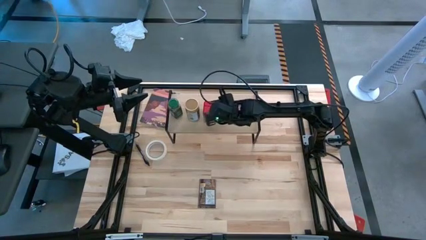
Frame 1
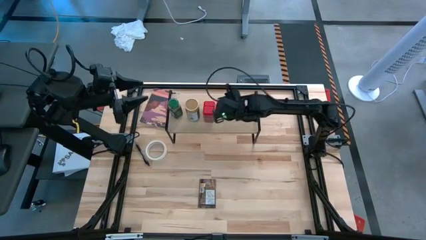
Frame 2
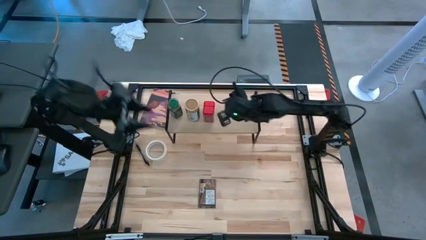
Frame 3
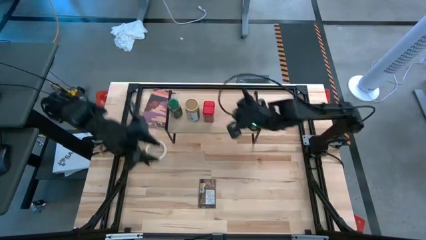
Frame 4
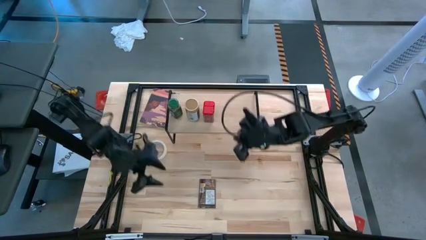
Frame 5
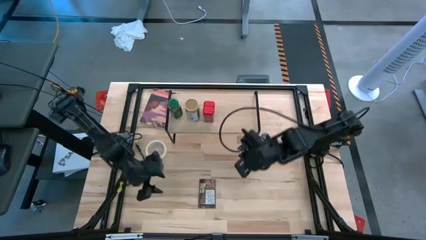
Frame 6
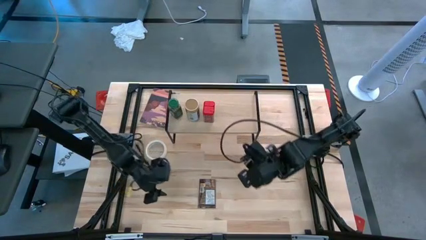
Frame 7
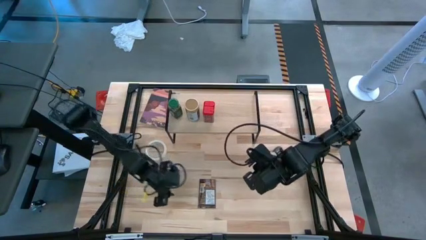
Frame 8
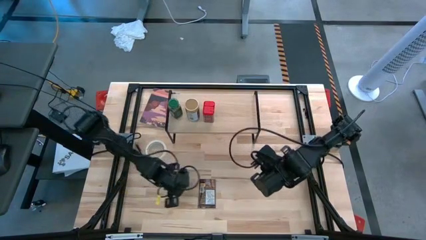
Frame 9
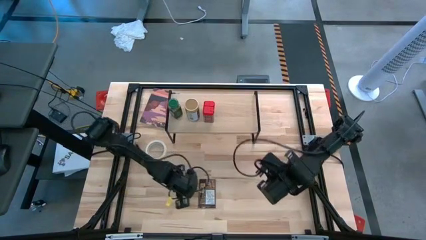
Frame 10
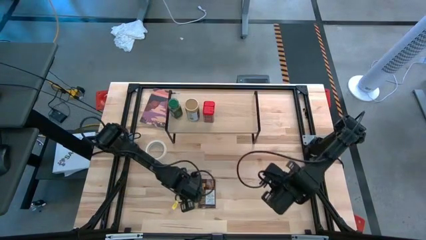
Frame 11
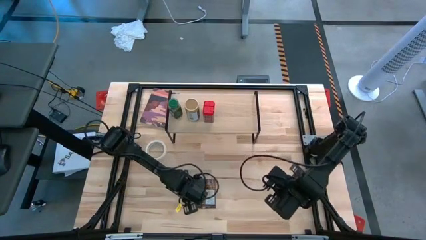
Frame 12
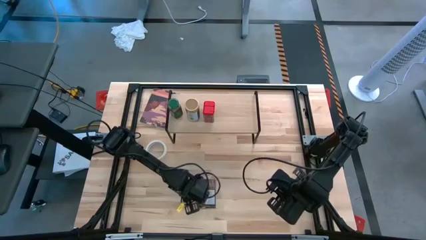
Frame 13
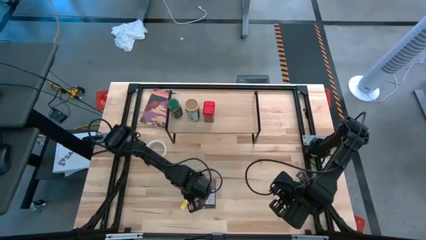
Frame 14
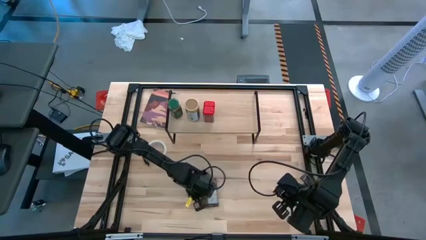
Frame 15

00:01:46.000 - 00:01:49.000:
Task: Shelf spices
Put the brown seasoning pack on the shelf

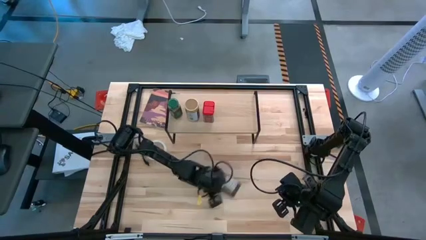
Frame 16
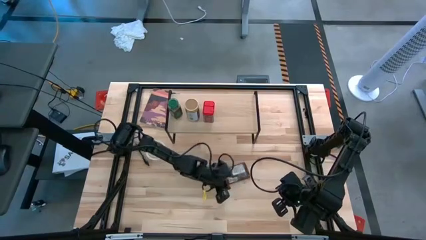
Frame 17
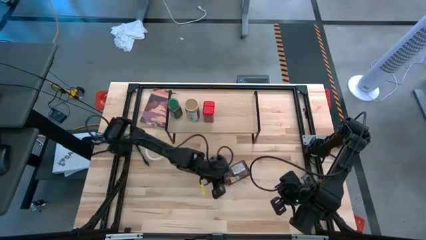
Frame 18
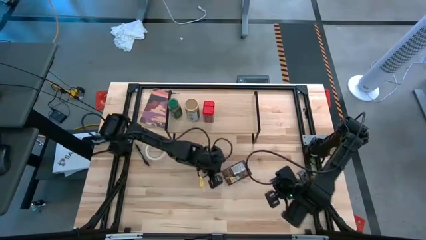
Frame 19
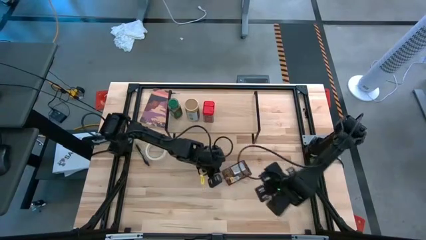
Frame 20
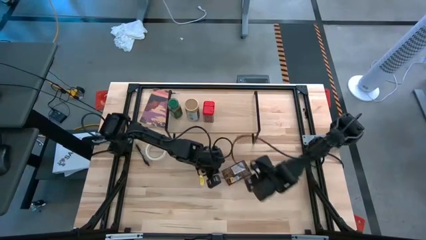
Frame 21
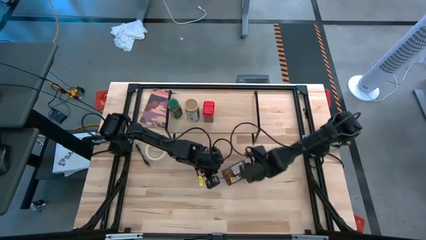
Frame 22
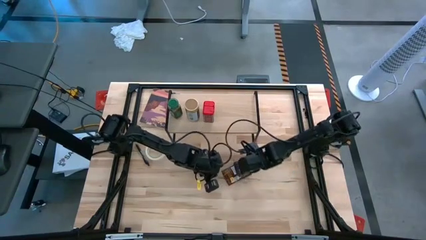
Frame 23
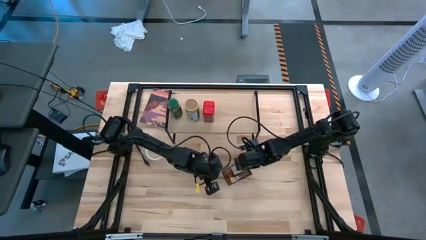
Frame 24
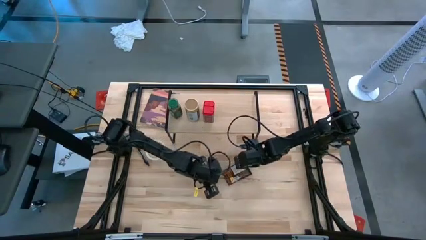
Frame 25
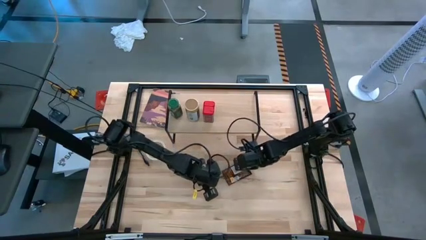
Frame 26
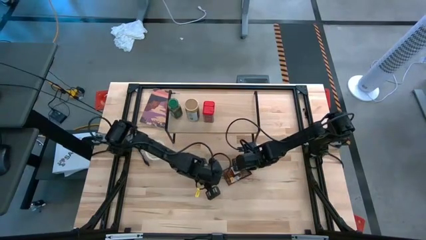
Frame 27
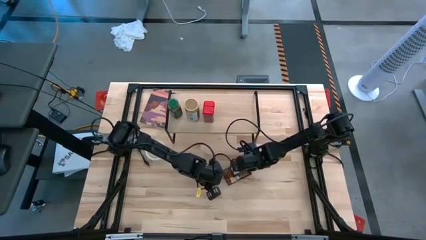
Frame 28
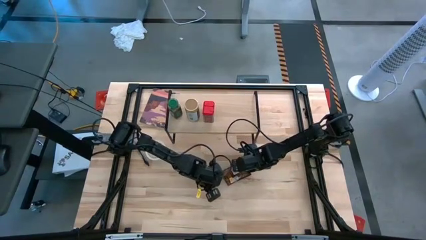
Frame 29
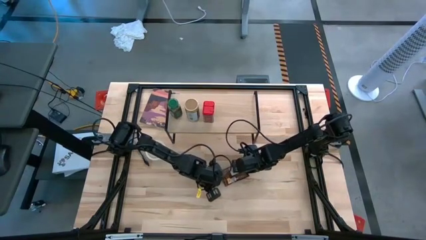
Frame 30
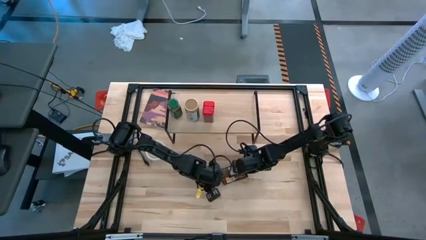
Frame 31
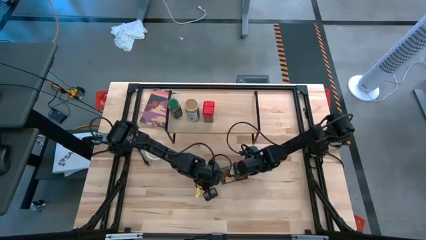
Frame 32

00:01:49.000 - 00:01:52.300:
Put the brown seasoning pack on the shelf

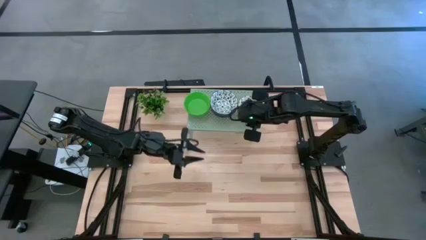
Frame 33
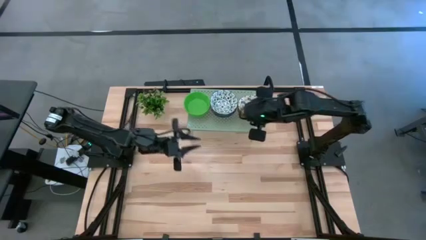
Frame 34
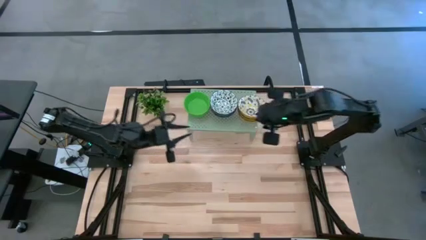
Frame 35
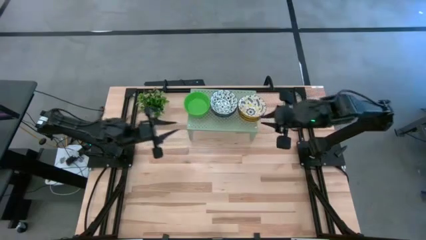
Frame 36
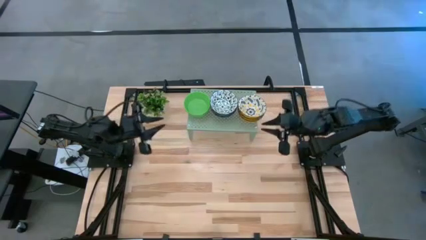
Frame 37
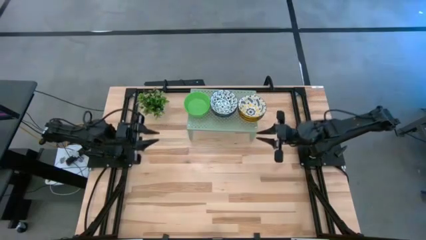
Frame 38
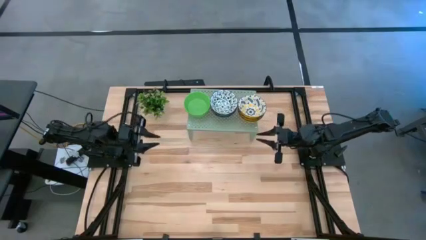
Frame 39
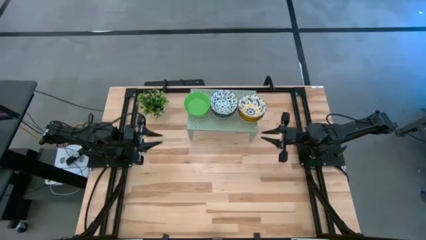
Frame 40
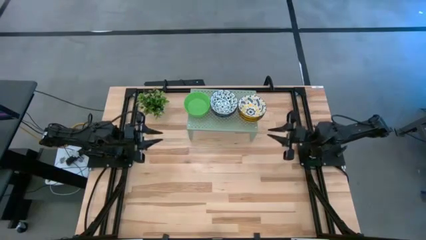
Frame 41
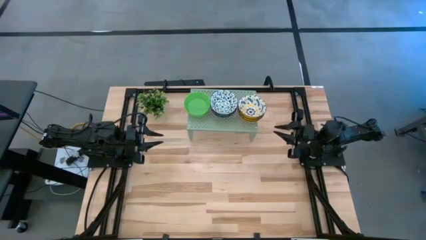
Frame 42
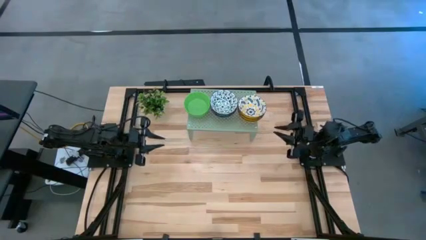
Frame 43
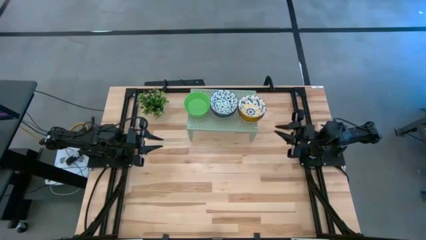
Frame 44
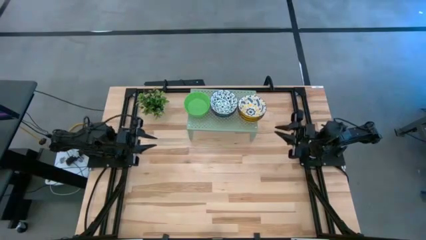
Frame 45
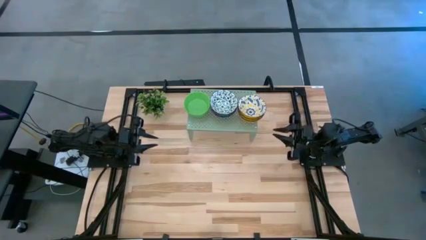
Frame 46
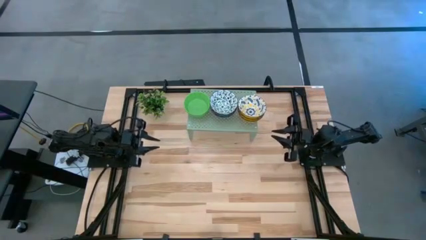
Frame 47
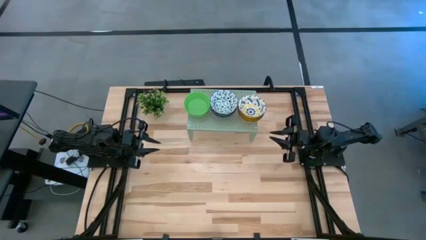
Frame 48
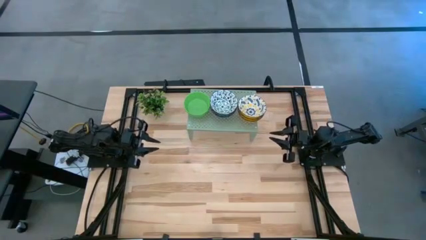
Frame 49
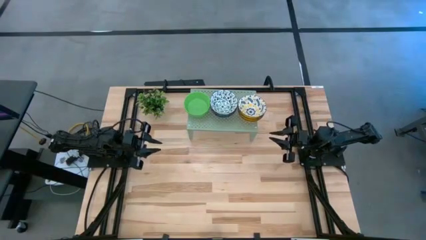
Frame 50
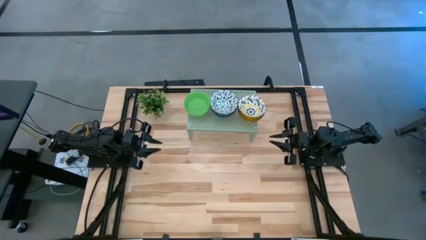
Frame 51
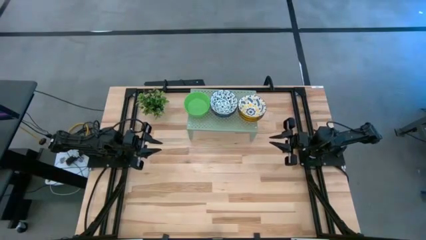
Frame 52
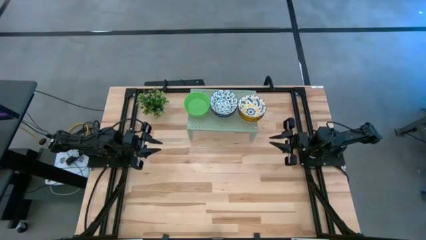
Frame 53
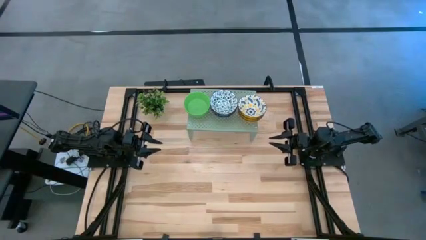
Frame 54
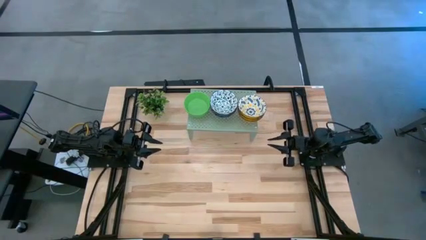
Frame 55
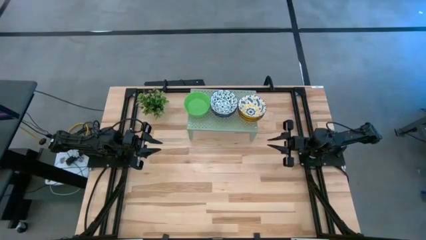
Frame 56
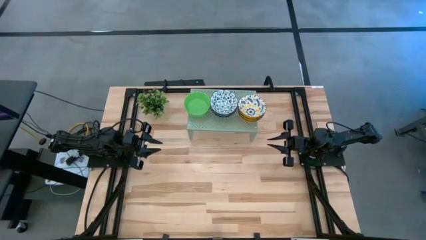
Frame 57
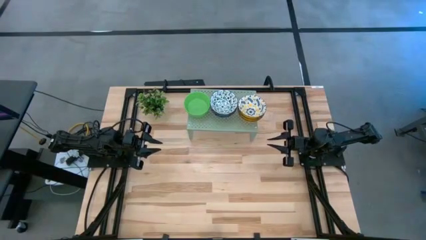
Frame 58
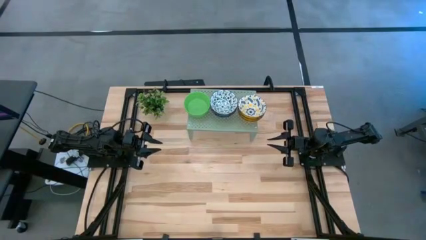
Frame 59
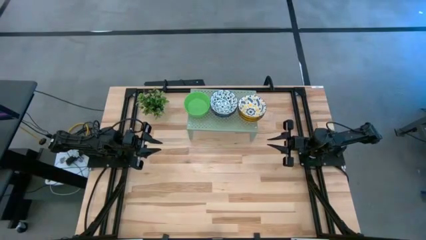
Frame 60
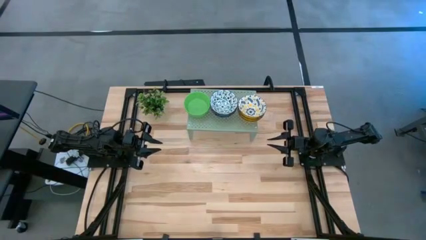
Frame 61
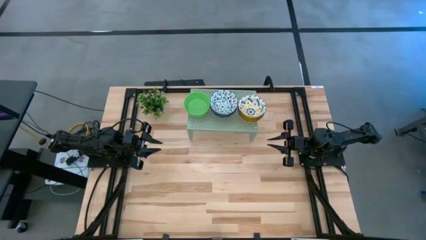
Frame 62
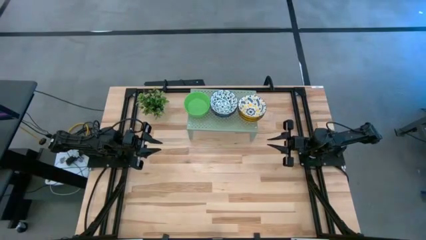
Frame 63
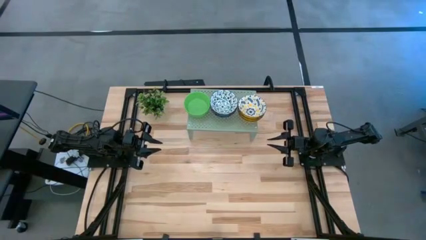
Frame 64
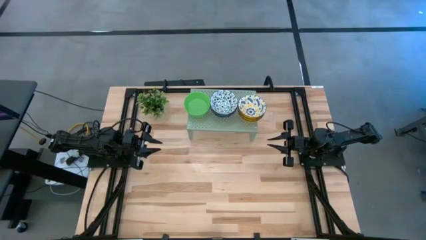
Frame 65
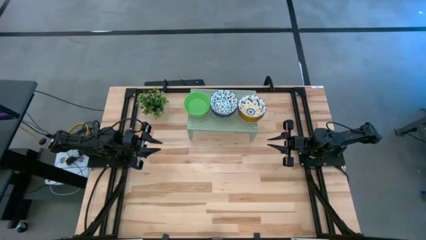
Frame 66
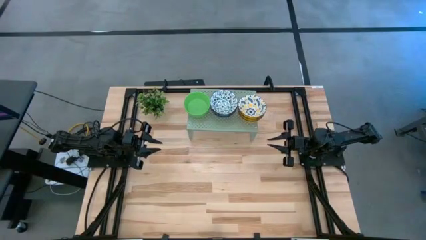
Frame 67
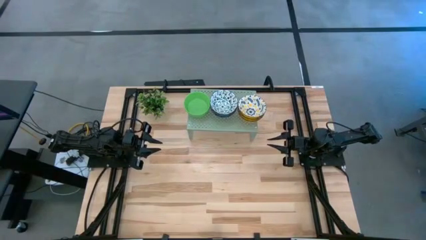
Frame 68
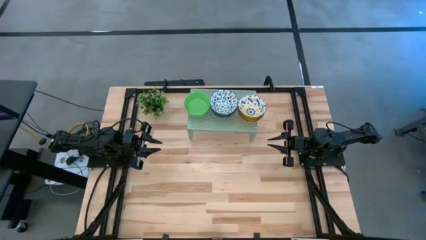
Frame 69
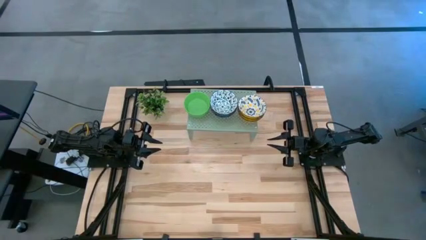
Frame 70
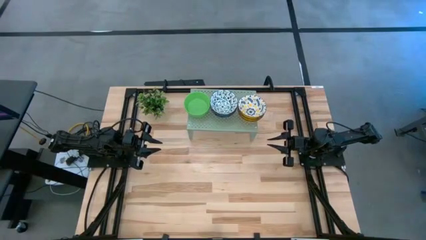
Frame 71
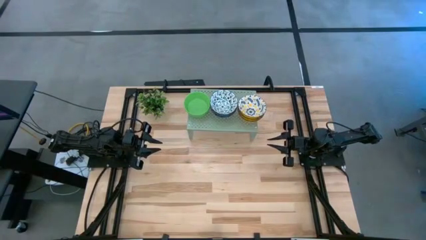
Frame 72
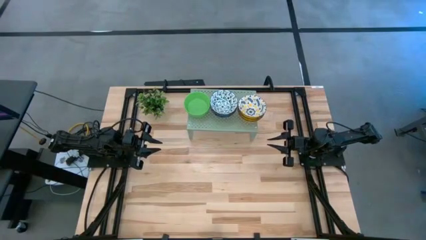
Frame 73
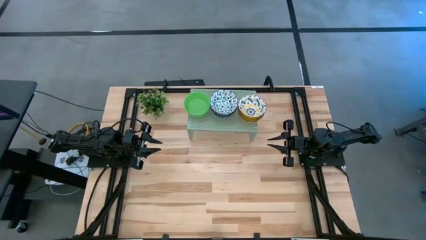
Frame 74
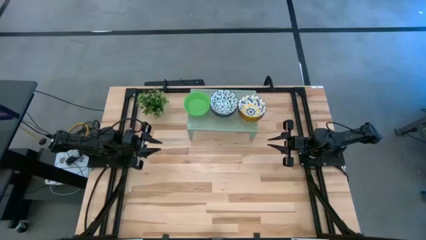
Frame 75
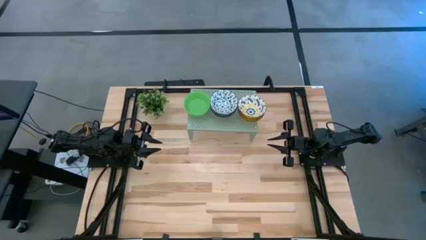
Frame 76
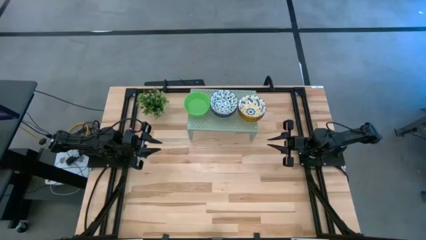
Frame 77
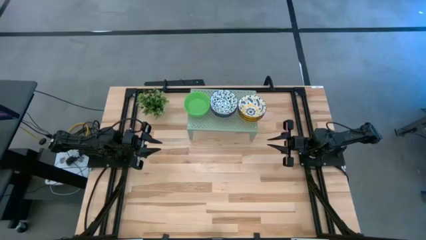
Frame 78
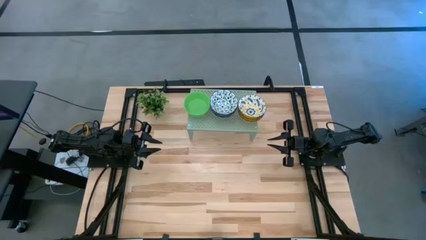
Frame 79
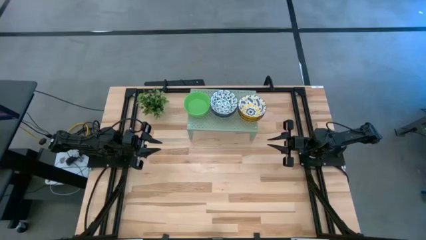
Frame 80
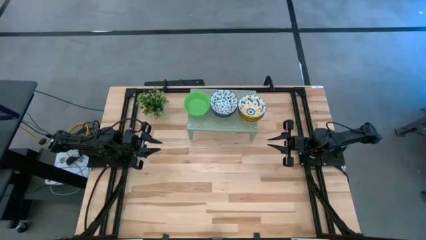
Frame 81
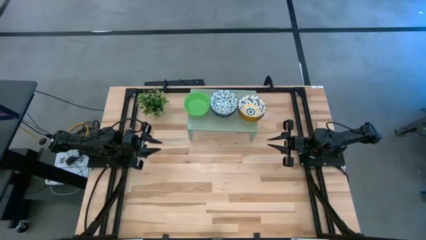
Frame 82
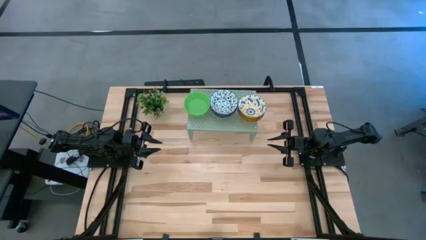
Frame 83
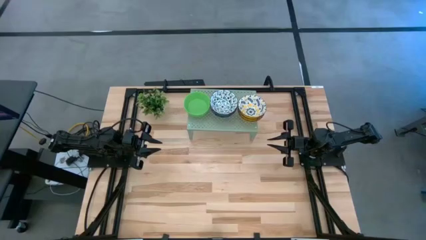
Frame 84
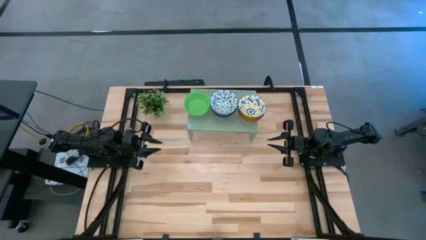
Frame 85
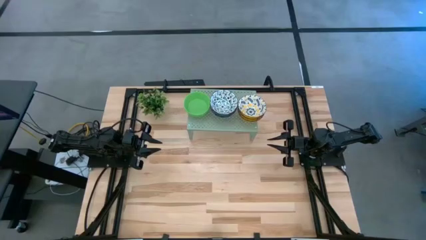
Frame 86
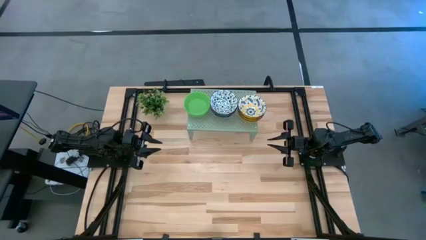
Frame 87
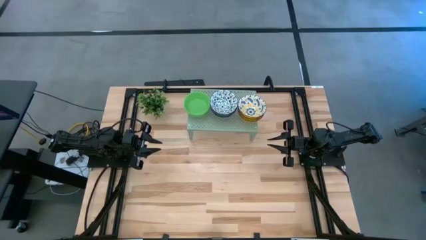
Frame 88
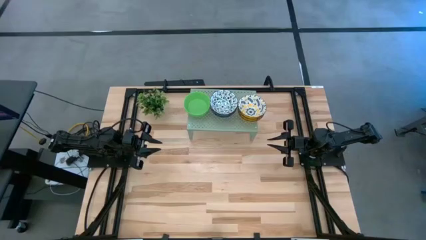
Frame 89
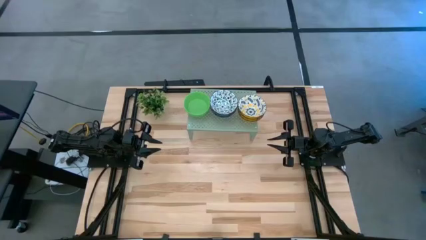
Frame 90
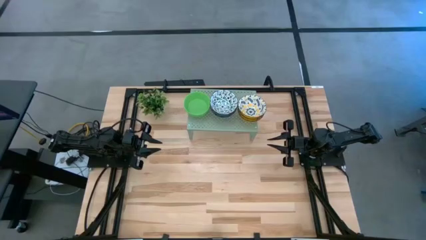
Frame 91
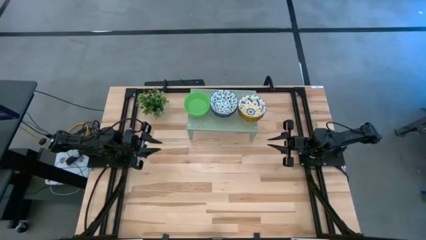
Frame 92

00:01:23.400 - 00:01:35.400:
Task: Pick & Place Mini bowls
Return to Home Position
